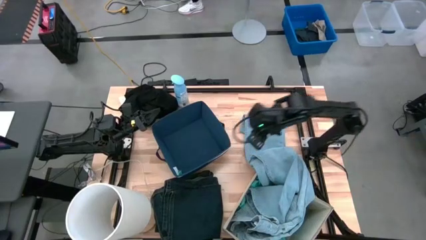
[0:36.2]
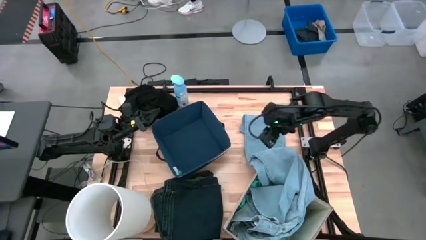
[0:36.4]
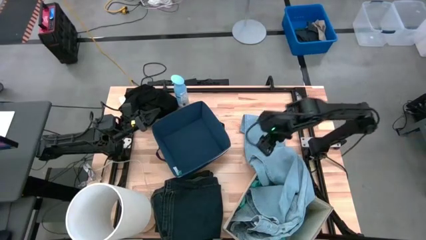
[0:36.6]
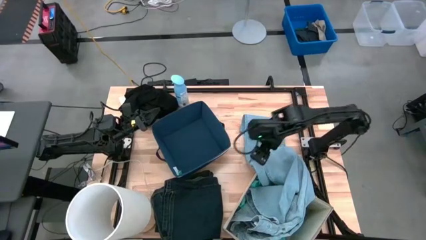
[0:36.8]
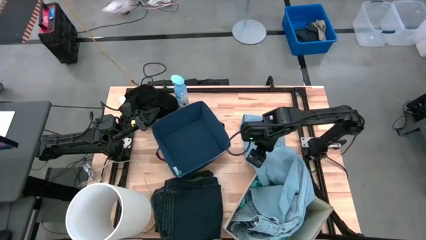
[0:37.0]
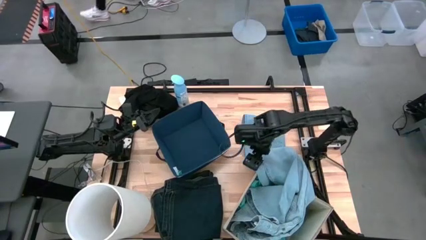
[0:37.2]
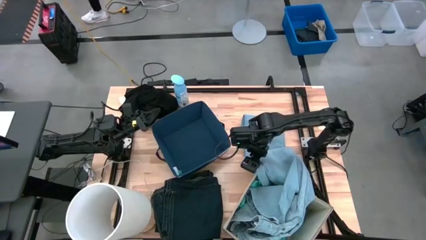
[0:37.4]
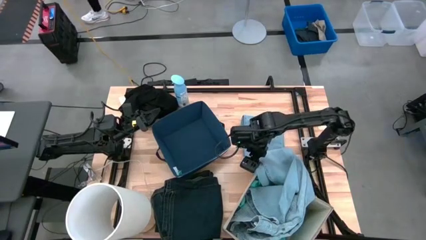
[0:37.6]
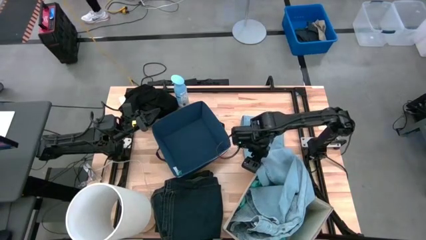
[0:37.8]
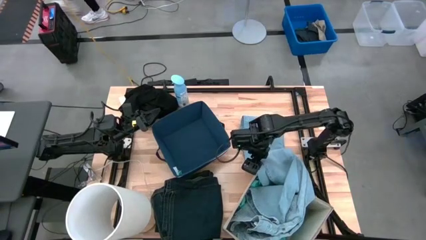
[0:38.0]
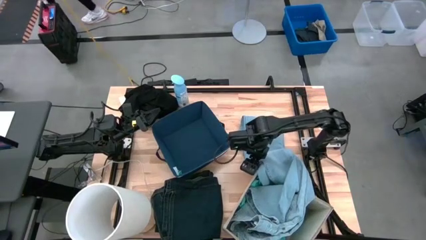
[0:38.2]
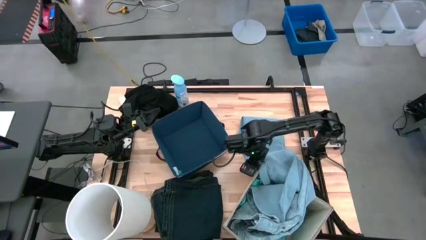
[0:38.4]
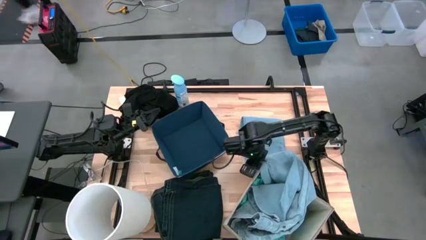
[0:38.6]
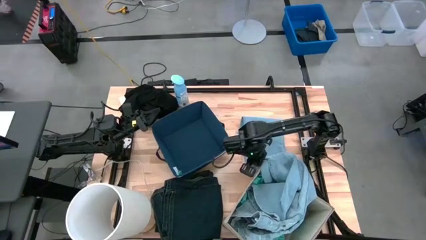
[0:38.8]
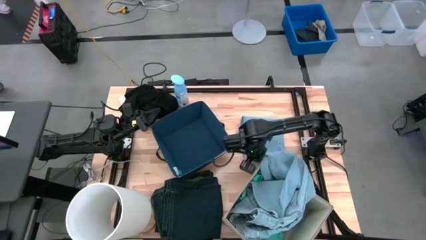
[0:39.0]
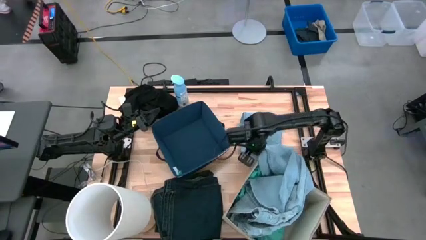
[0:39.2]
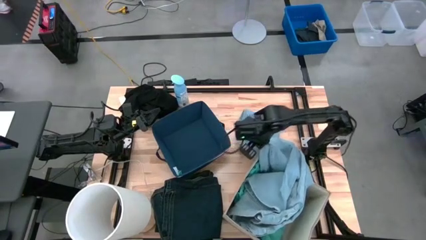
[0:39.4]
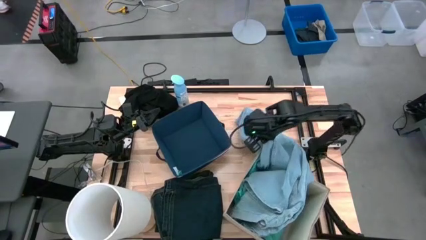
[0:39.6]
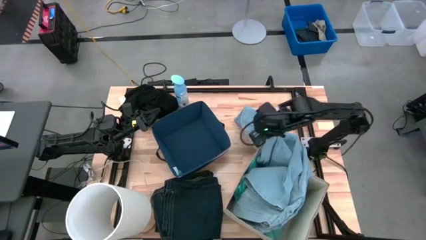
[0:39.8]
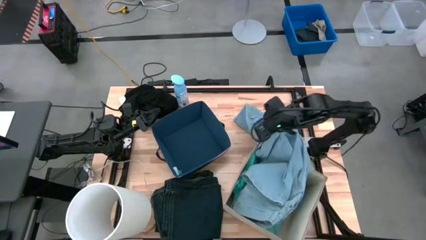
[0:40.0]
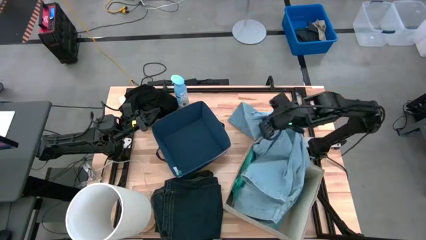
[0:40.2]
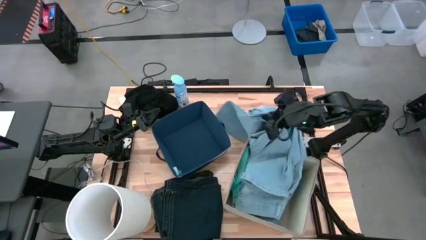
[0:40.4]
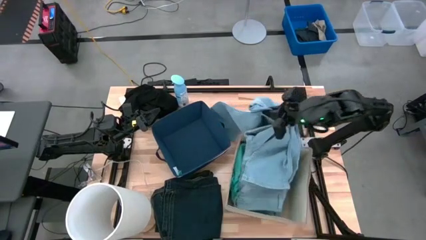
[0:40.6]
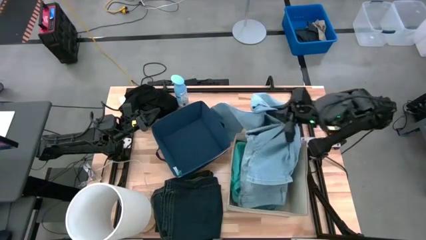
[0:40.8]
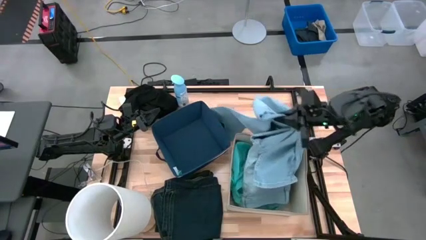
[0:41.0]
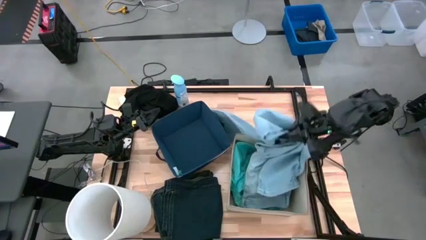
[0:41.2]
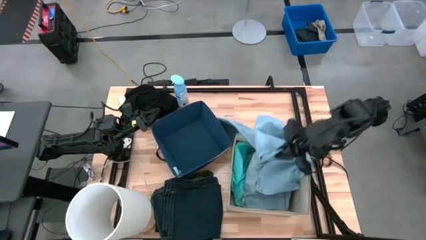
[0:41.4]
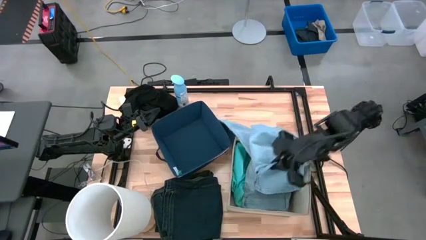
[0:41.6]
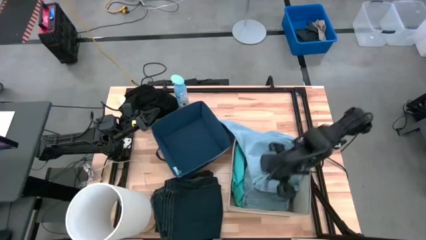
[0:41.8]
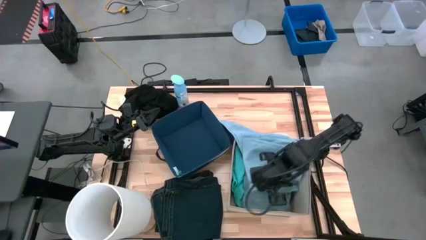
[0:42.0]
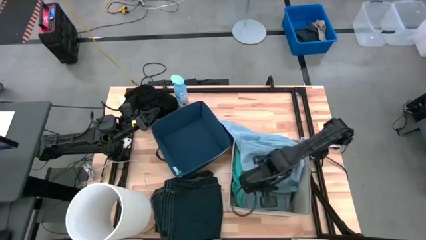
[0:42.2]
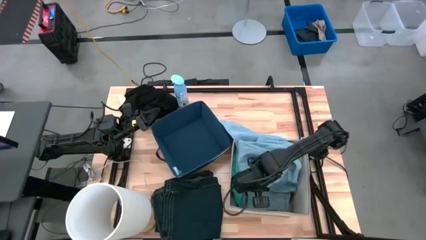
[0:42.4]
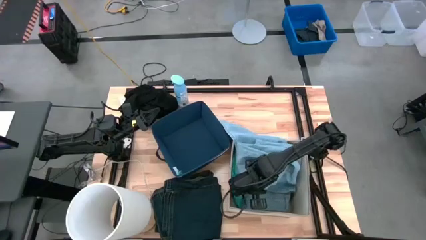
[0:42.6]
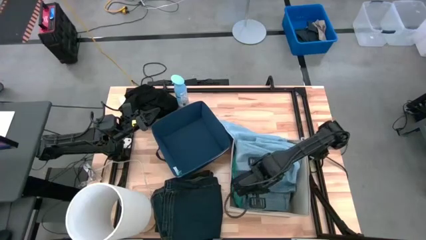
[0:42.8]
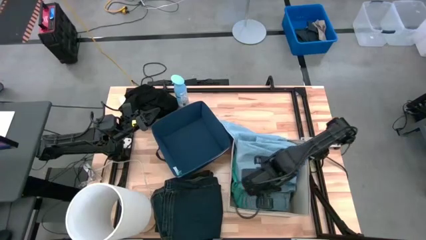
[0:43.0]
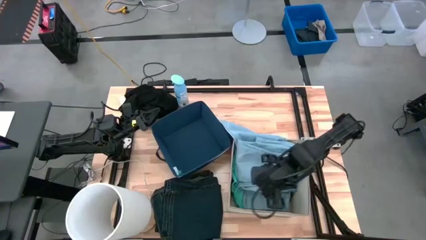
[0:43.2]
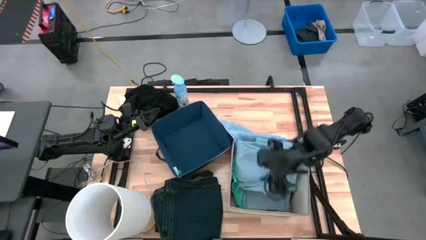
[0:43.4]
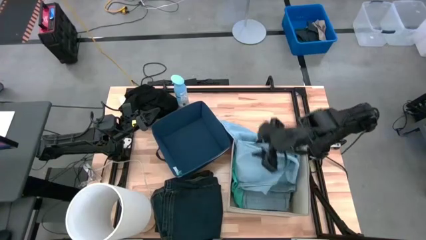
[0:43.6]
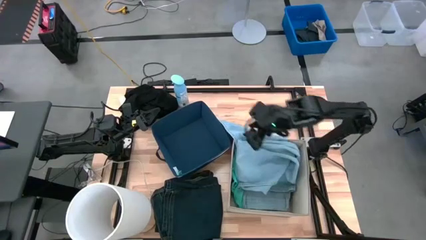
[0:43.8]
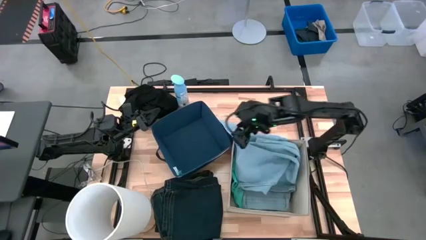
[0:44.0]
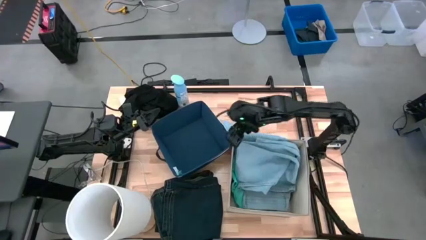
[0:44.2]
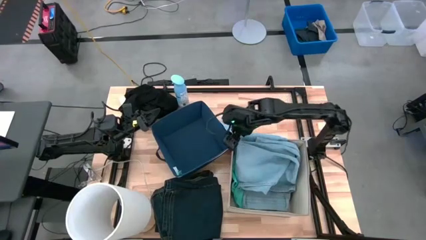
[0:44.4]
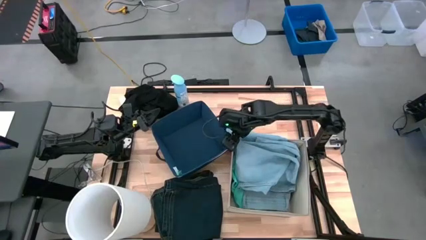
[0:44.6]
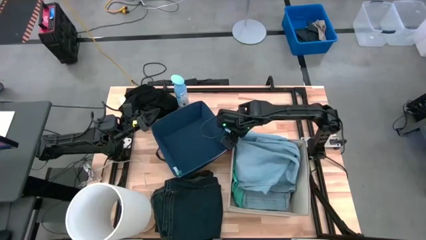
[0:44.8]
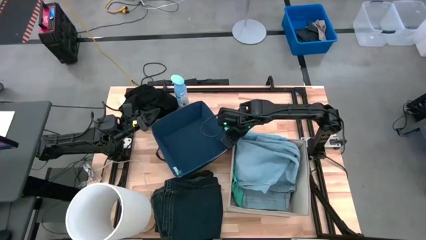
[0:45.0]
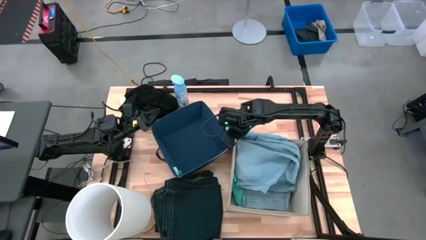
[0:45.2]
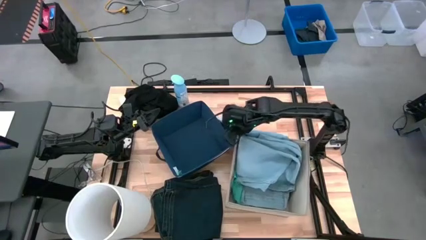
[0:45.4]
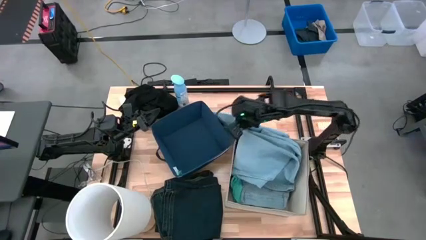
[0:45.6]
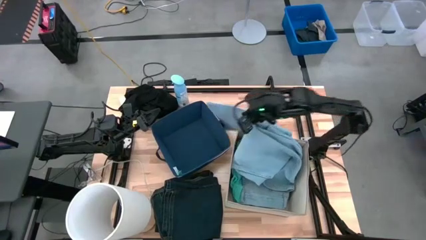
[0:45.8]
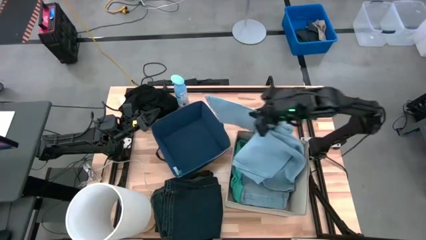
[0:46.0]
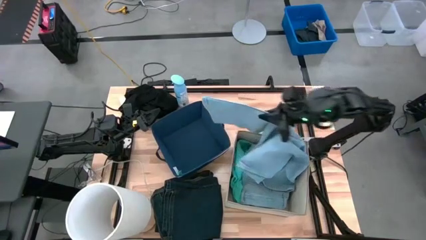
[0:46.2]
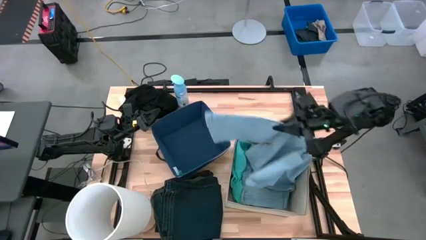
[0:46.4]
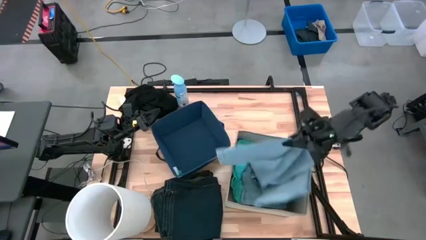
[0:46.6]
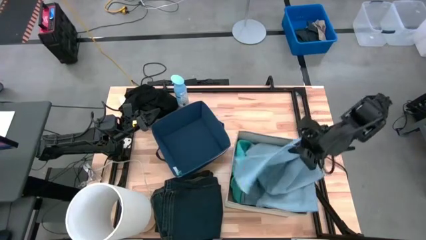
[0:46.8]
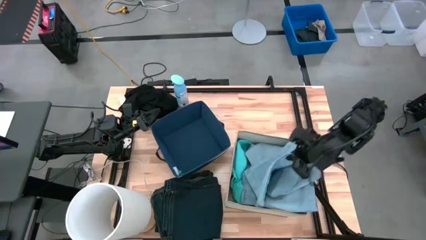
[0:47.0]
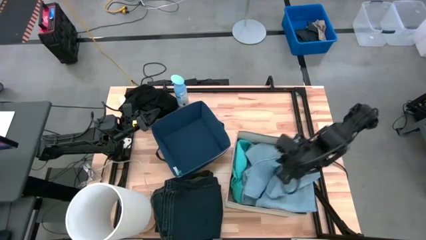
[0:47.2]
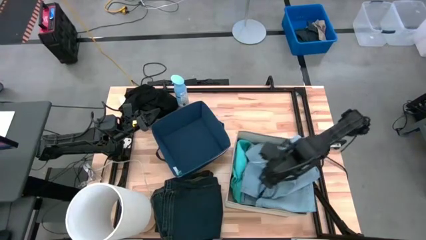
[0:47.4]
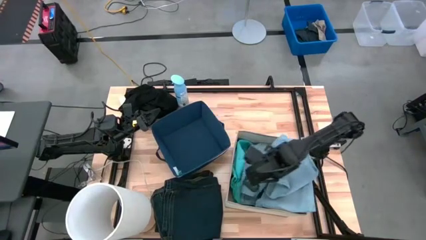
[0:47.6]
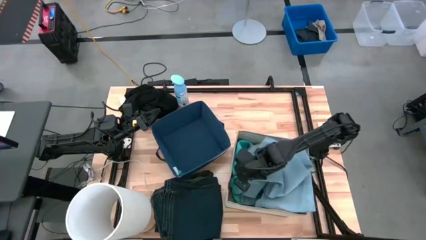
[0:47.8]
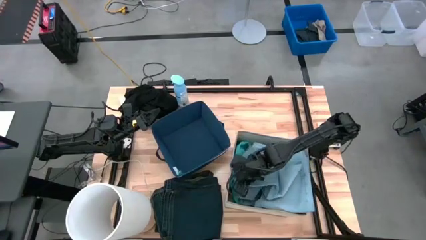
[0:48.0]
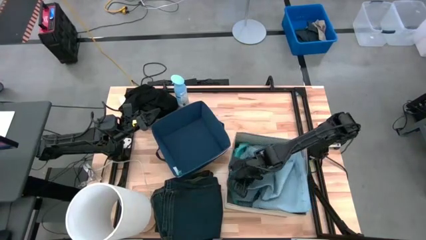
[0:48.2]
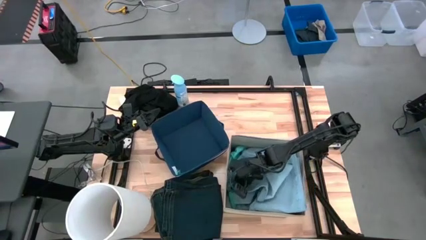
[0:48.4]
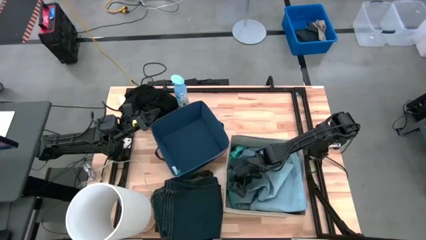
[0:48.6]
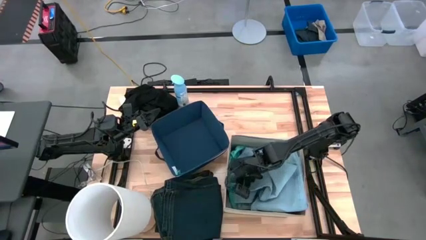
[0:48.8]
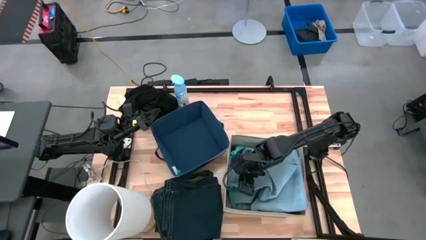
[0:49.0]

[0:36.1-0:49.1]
Task: Sort clothes
Put the blue pants into the brown laundry organizer

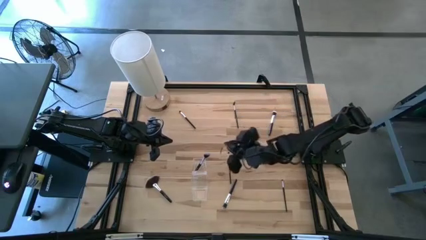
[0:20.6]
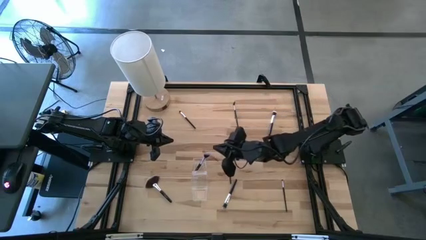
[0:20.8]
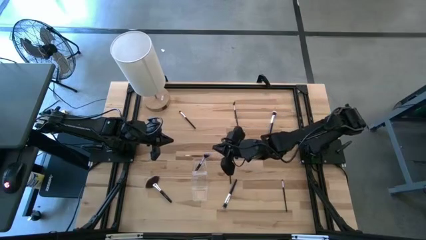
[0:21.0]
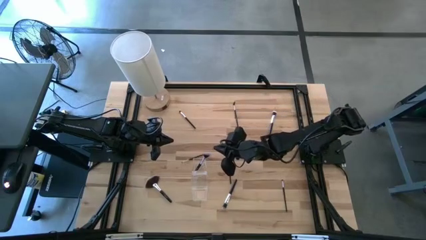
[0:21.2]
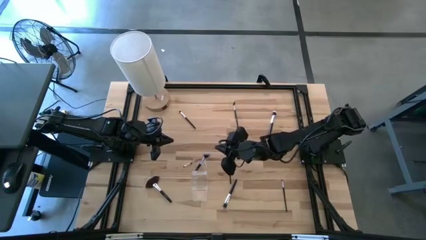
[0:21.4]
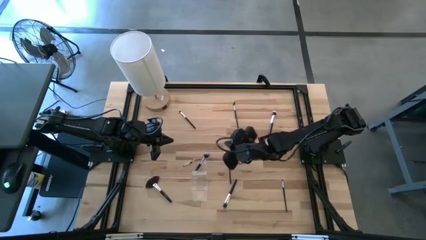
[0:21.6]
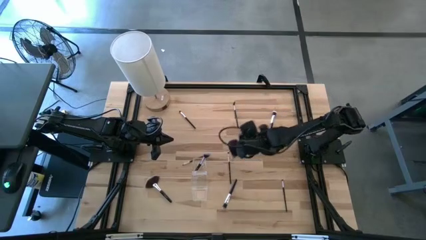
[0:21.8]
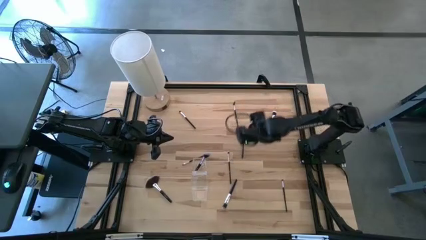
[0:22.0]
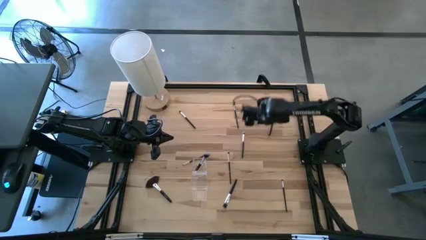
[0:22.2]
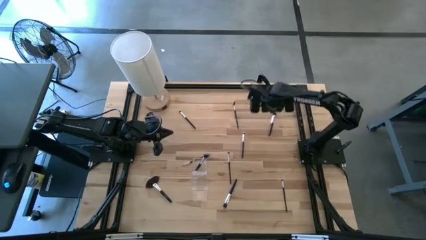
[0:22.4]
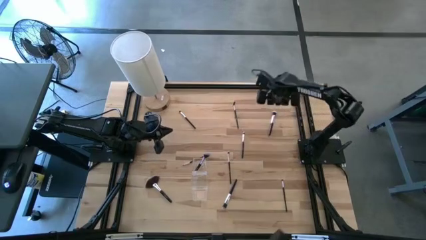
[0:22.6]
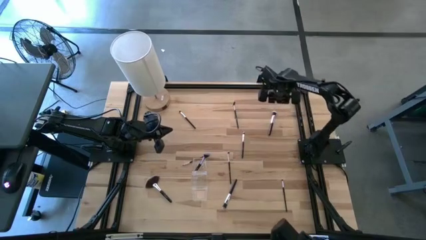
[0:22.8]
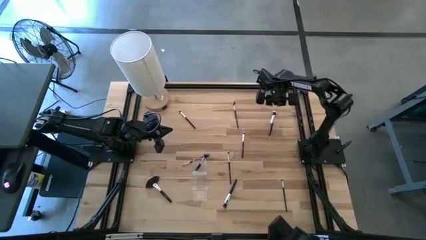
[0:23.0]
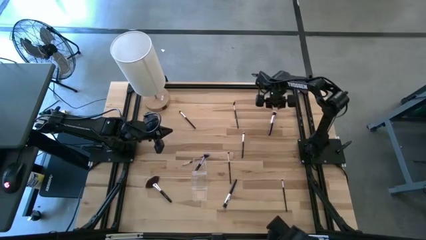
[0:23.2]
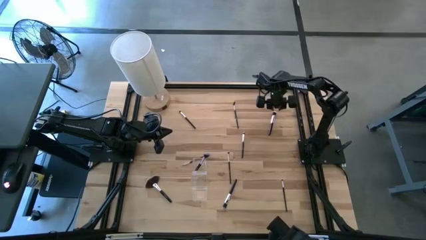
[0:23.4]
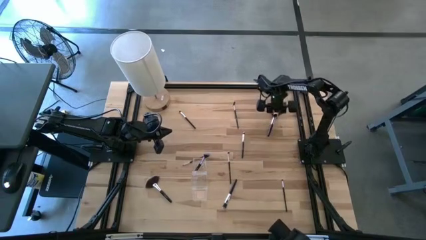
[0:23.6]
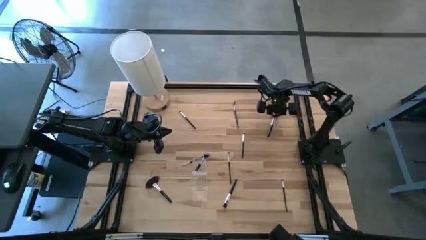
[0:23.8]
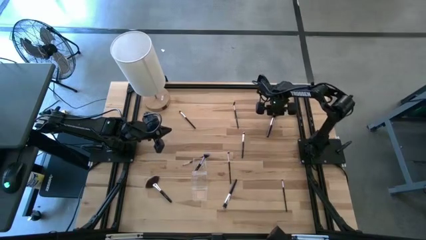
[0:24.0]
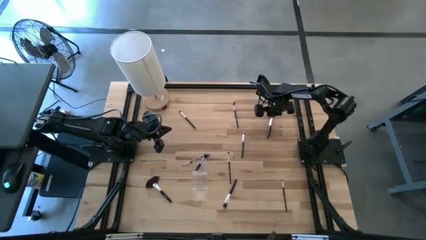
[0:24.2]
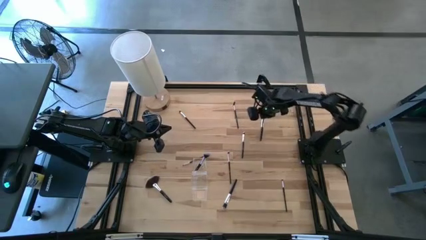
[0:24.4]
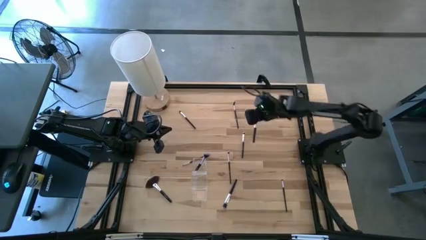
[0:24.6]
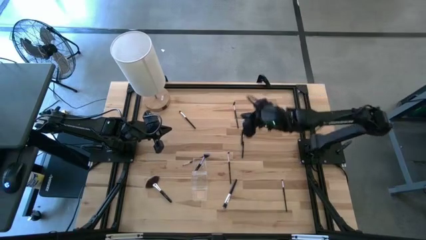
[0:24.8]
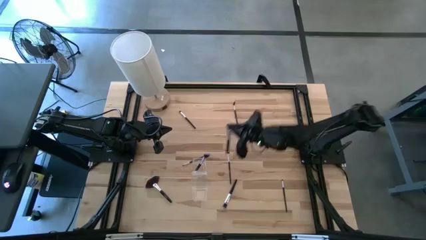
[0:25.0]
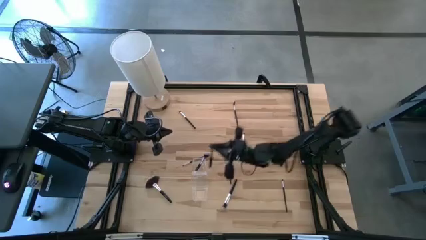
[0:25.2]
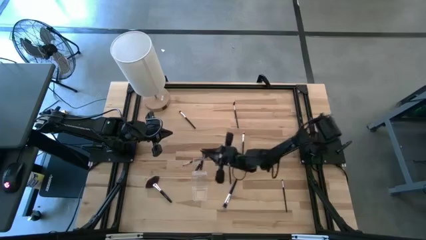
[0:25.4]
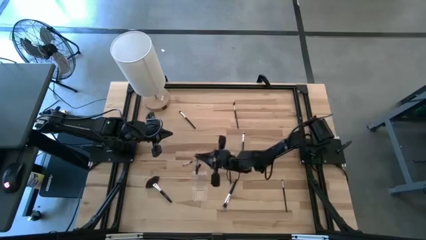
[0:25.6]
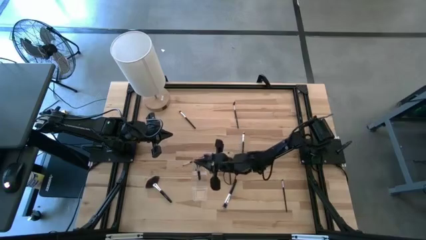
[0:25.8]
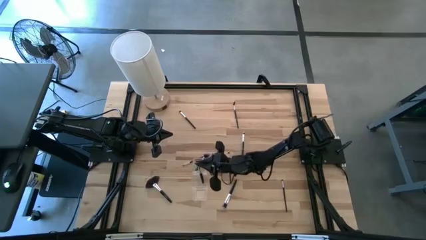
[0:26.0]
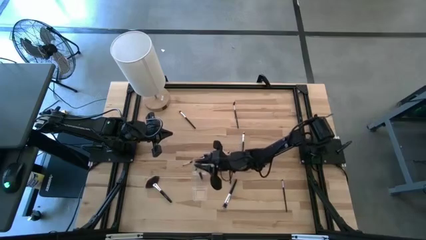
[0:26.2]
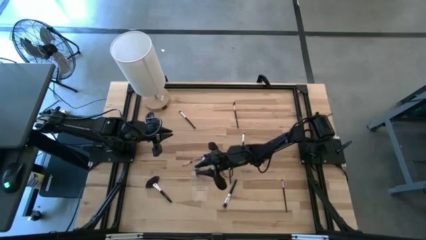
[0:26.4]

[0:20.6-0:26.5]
Task: Put items in baskets/containers
Put the powder brush into the transparent organizer
